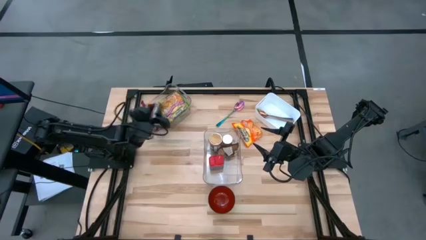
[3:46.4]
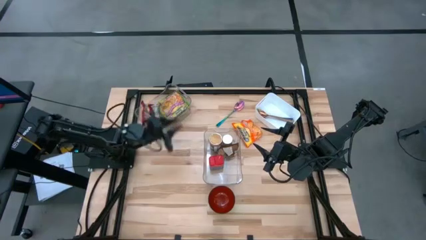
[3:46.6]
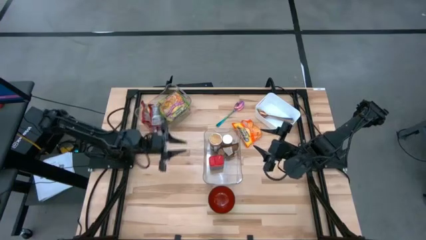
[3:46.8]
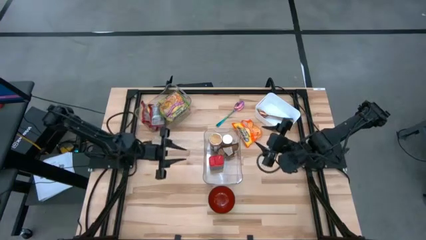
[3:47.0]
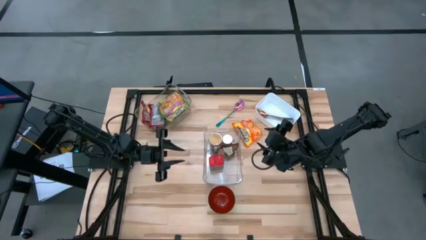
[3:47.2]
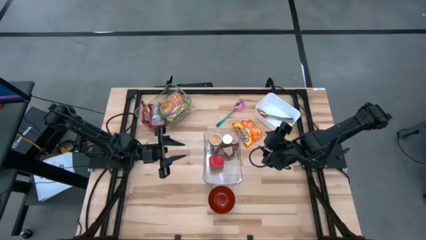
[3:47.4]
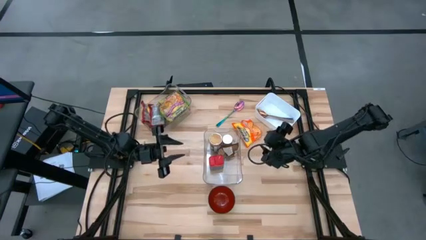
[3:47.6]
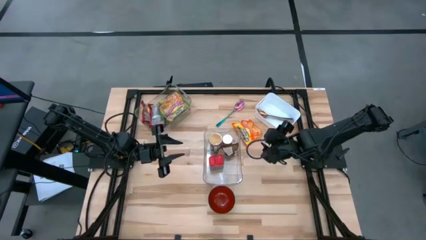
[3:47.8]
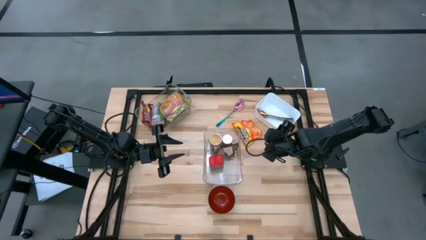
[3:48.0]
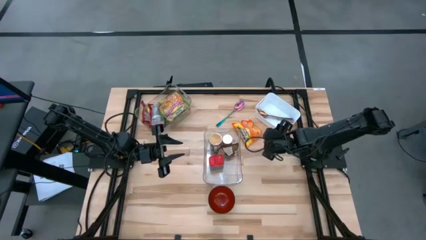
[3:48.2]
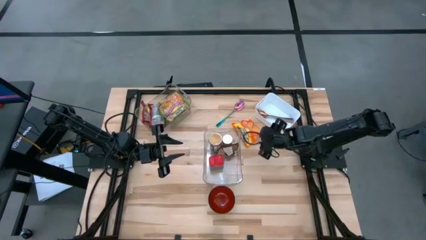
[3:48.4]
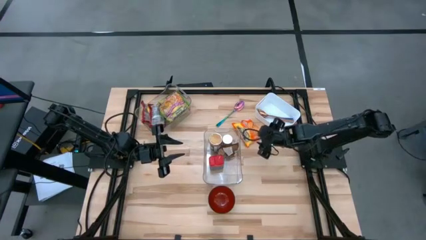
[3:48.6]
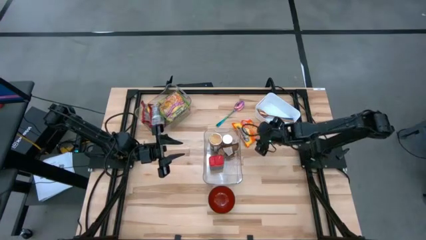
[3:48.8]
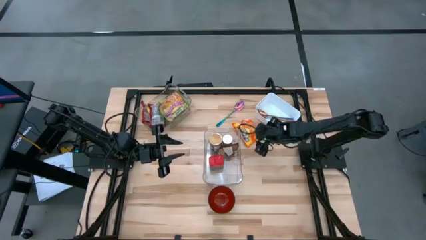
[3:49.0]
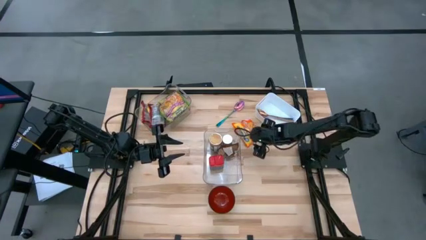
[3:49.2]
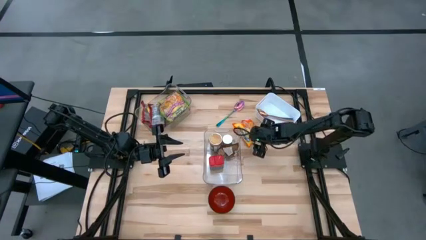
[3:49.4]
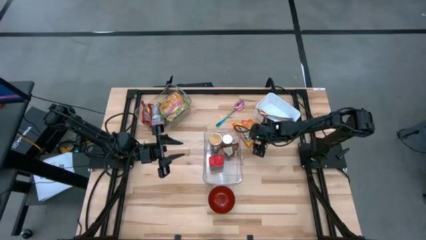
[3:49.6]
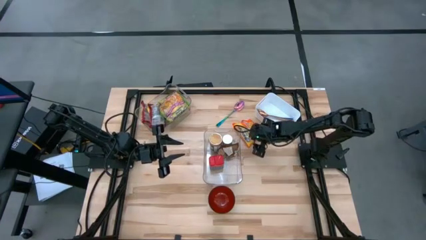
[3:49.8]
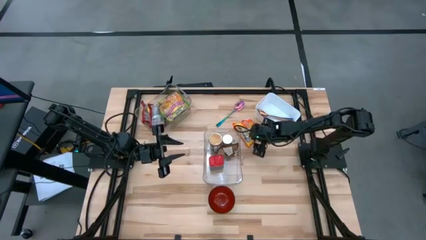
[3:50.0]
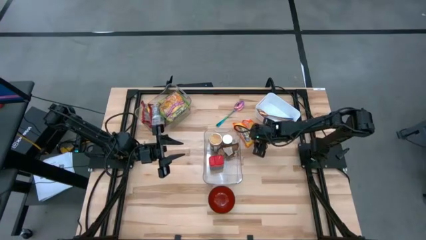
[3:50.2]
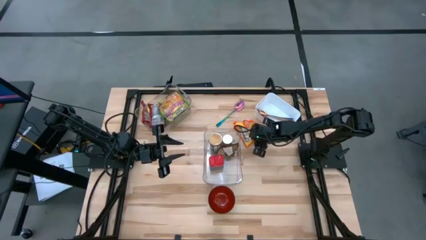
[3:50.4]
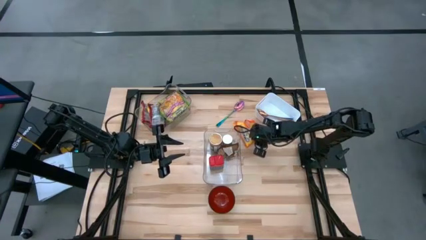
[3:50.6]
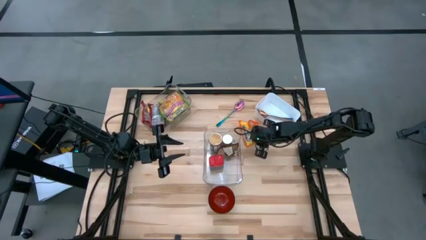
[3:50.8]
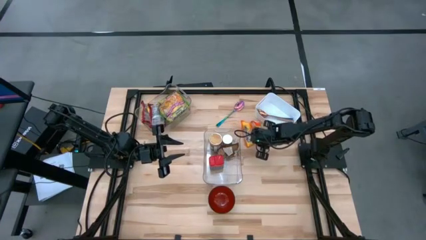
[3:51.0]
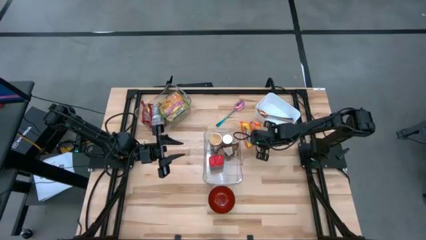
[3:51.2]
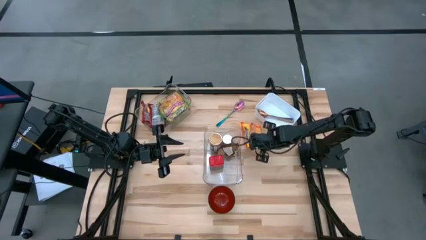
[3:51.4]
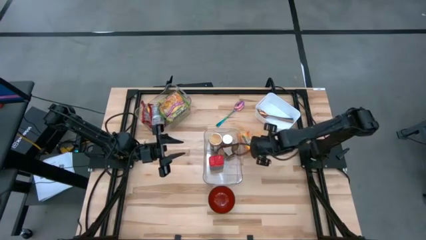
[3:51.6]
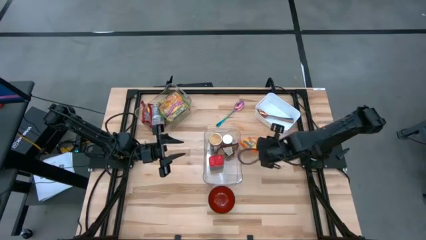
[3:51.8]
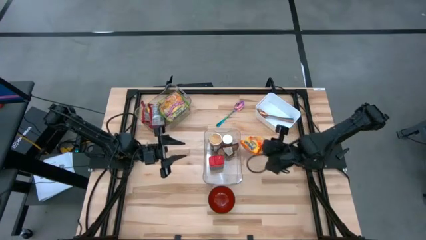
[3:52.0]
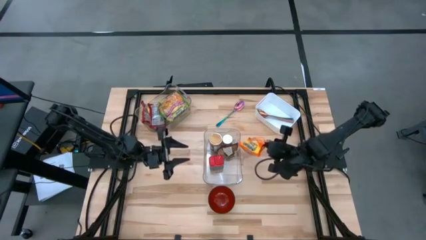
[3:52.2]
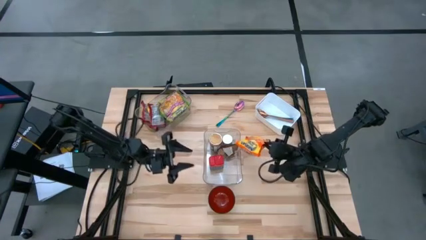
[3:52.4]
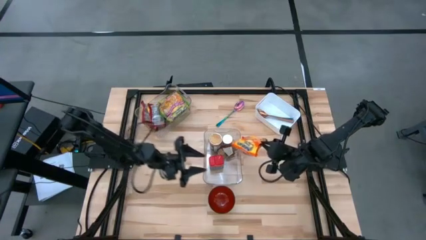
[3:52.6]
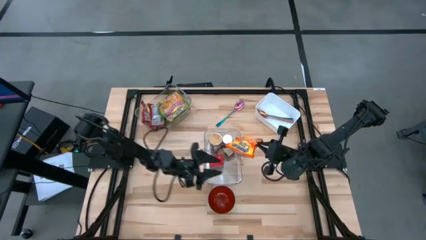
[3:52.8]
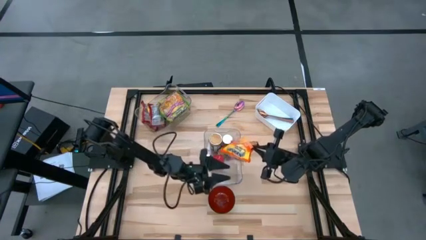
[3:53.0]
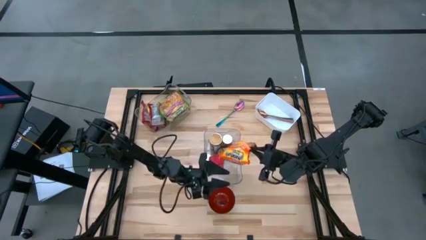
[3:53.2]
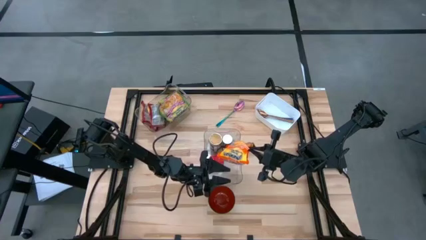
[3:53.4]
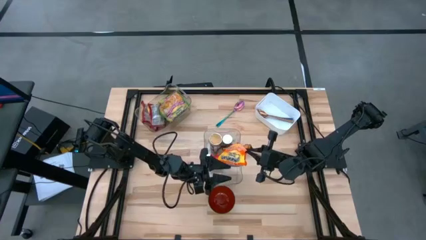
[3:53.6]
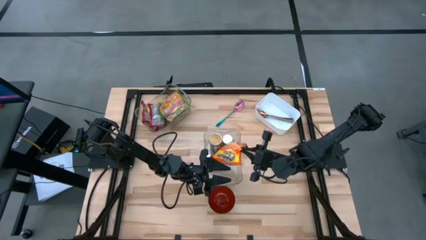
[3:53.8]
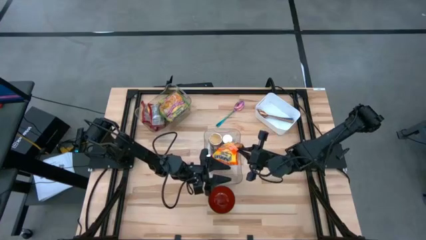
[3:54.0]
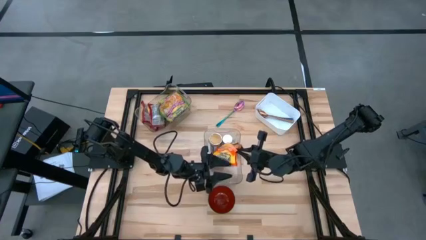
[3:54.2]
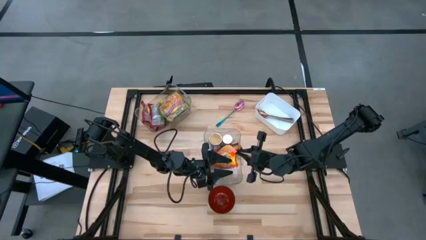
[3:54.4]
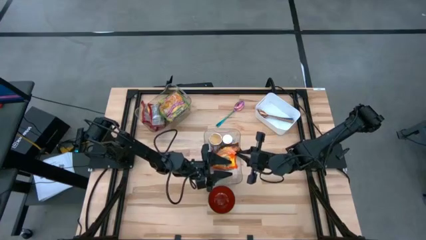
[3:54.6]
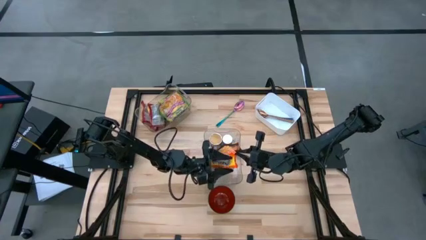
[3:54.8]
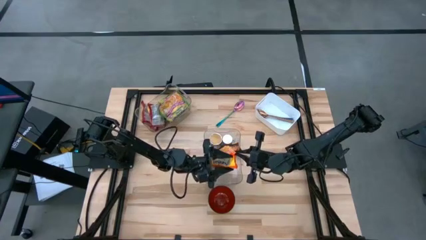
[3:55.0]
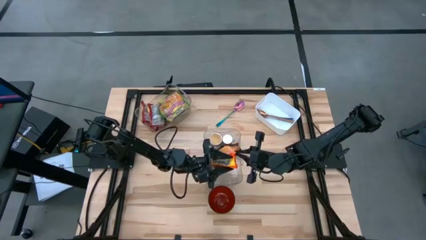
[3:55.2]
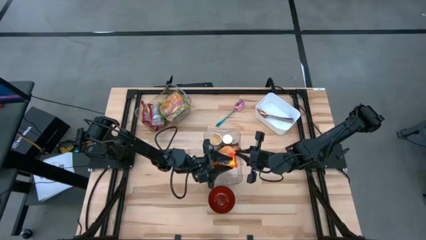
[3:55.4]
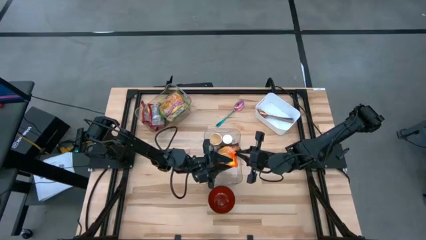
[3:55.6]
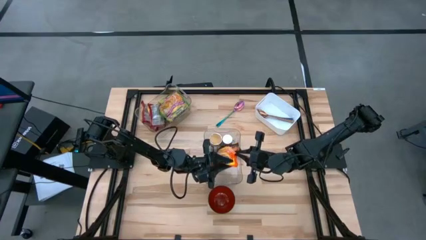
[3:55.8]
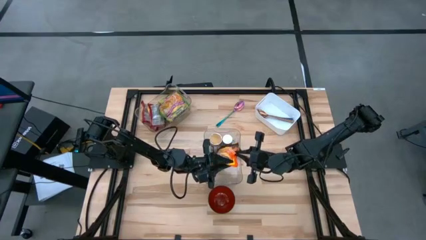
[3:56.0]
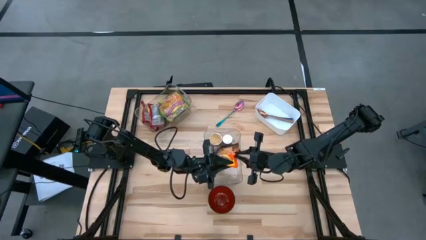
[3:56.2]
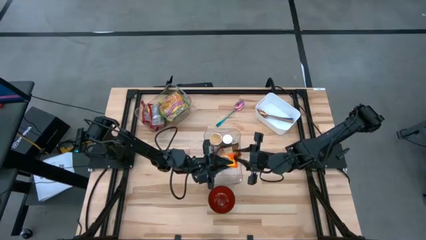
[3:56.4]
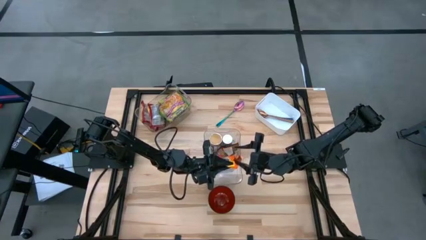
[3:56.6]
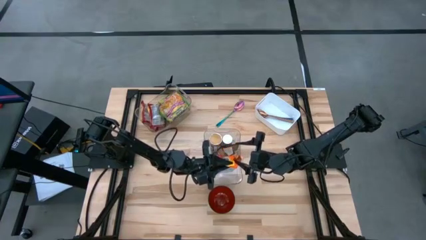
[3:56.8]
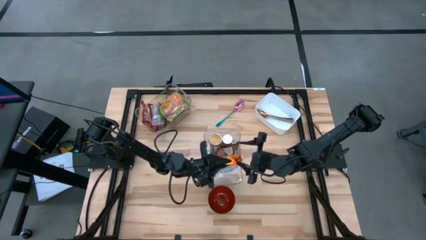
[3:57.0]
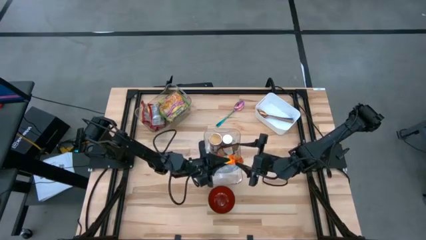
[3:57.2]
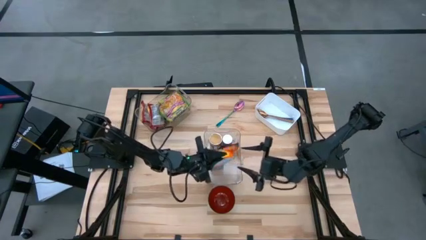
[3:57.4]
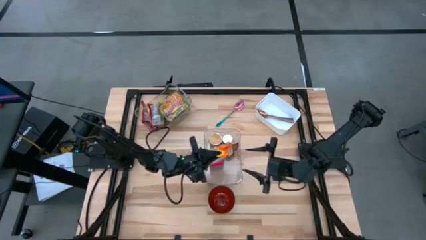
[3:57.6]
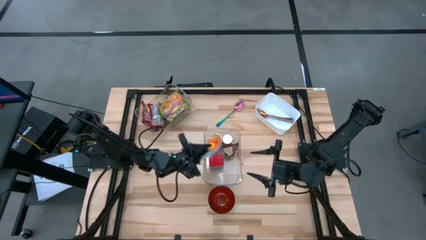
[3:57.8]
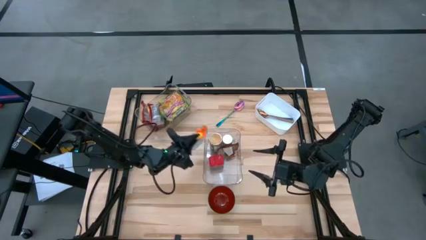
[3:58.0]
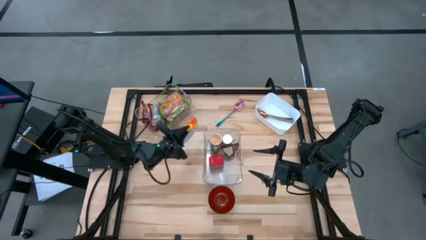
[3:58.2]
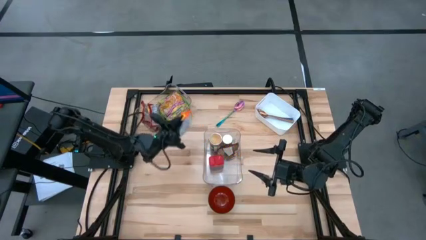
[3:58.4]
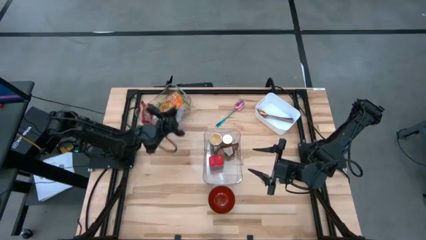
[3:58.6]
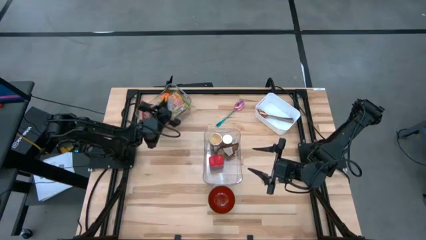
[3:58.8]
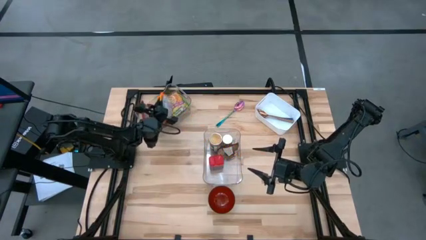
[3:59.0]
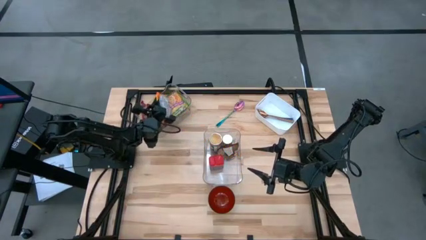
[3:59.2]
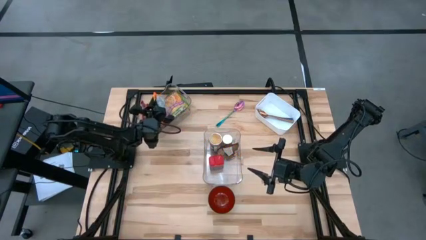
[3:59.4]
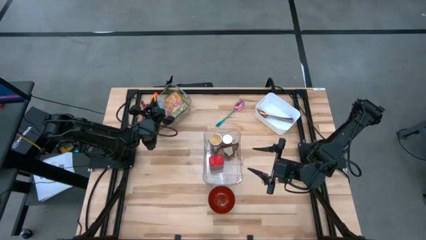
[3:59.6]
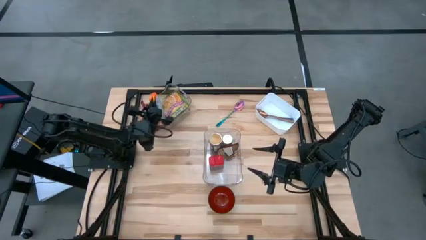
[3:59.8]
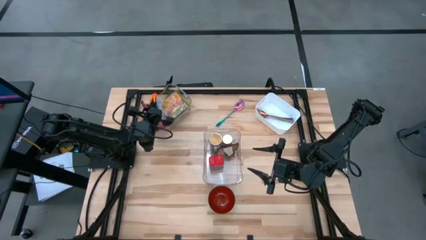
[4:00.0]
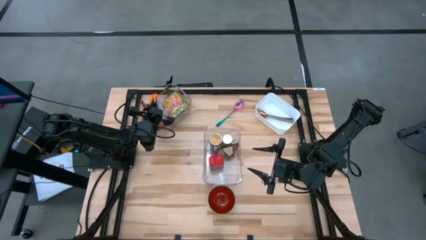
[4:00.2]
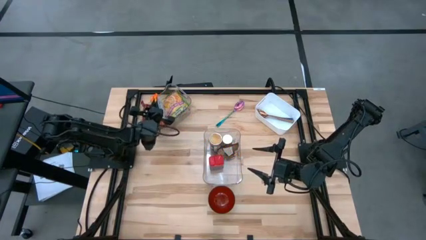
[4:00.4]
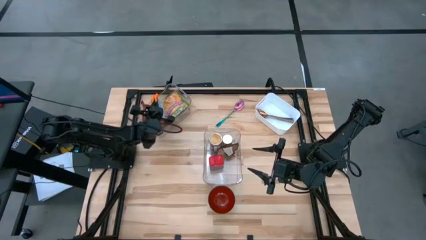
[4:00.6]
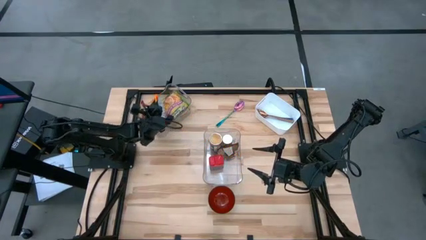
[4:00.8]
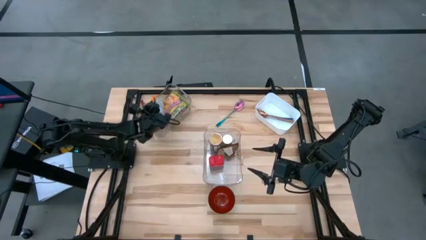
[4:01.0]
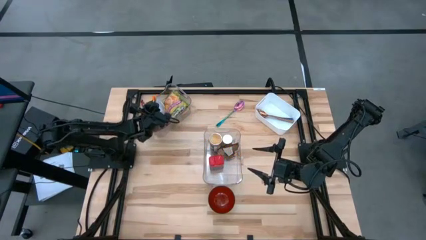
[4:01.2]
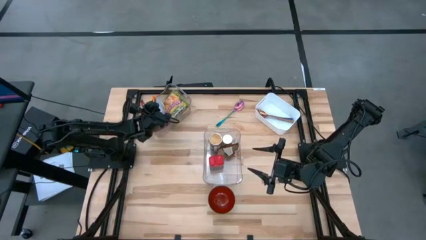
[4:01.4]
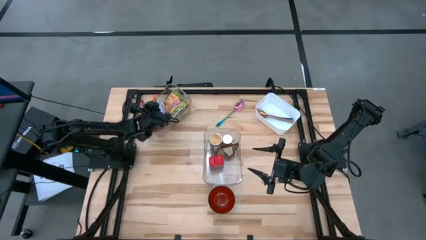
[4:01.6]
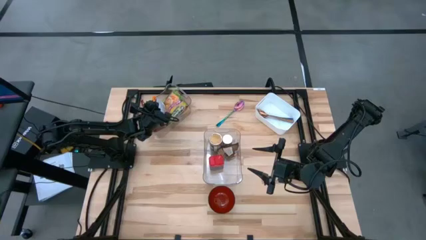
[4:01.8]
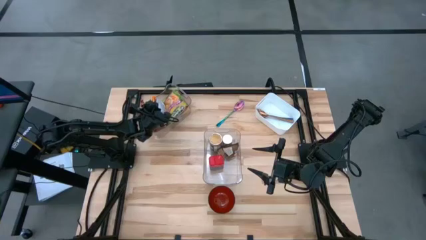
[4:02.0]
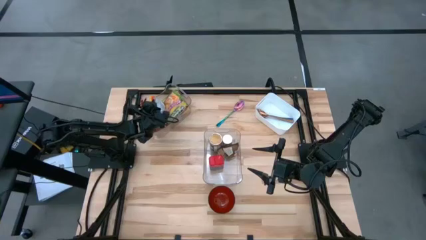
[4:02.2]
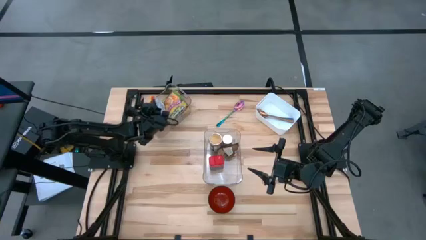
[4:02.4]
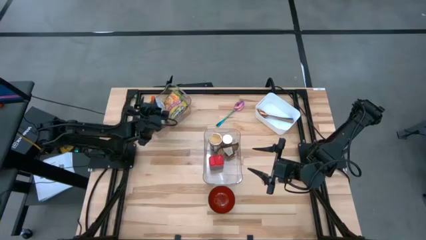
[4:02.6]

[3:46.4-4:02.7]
Task: Pick & Place Food Item
Put the orange noodle pack into the top transparent bin
